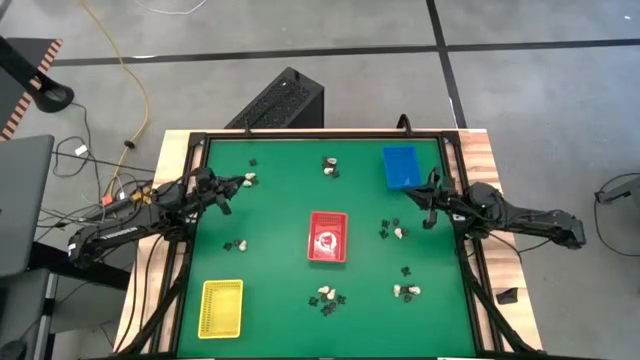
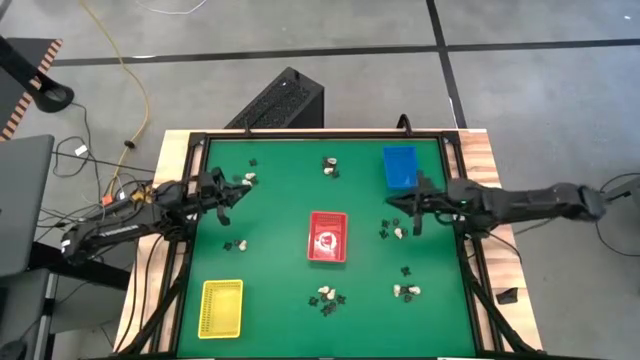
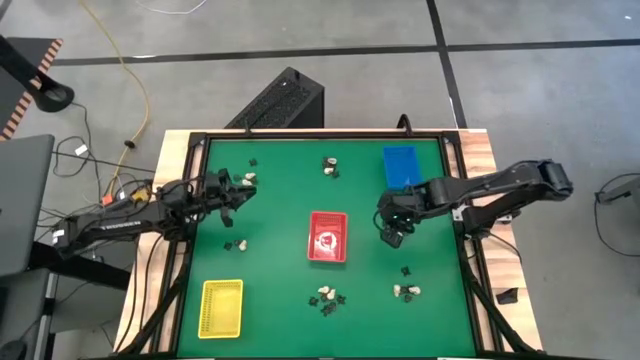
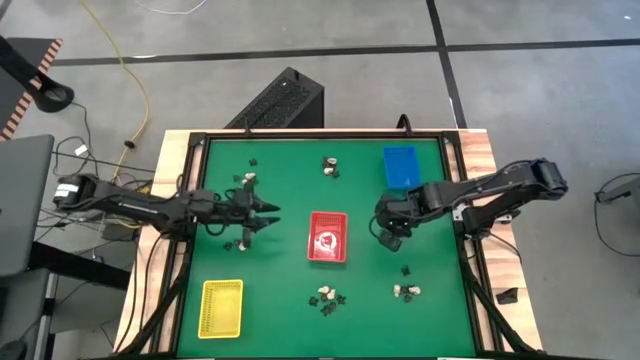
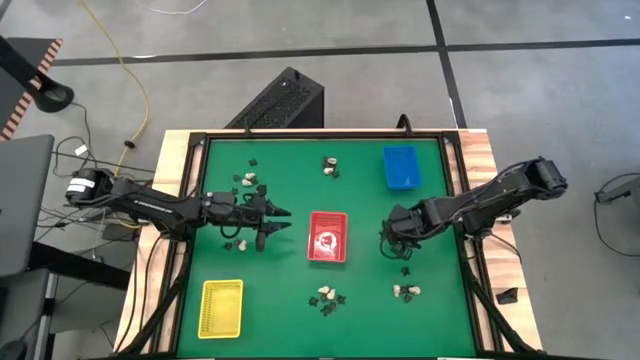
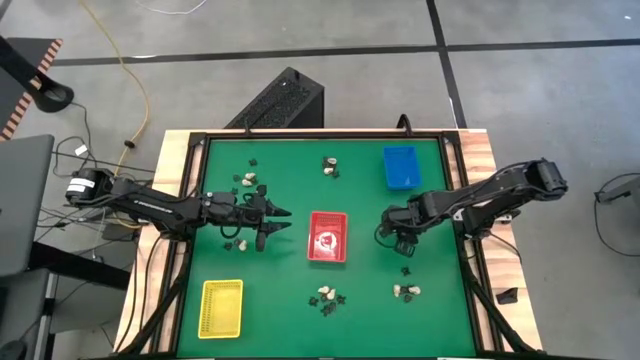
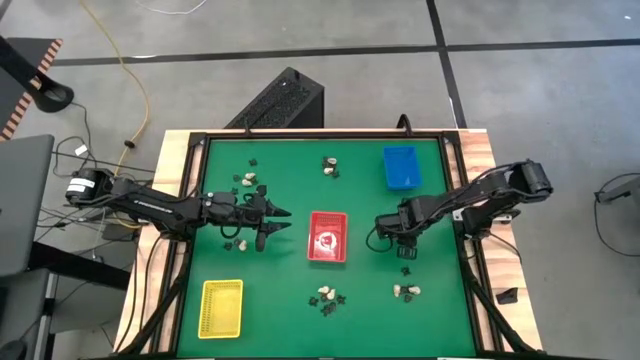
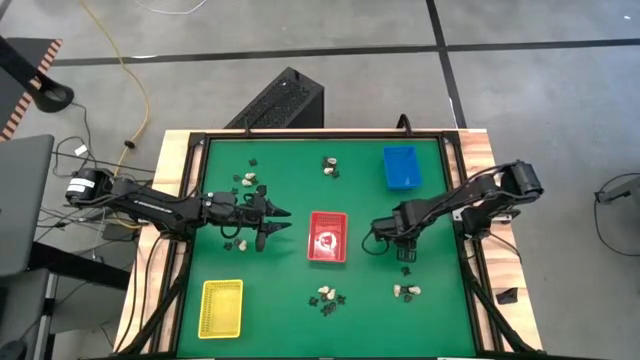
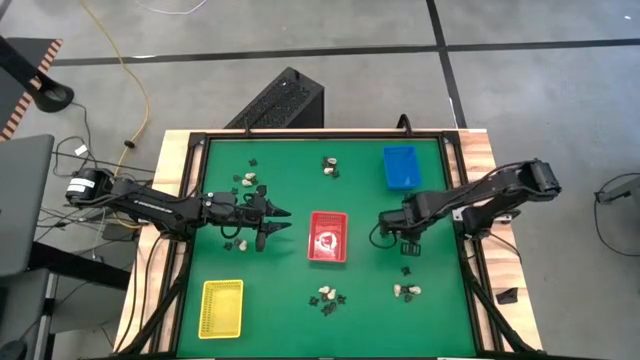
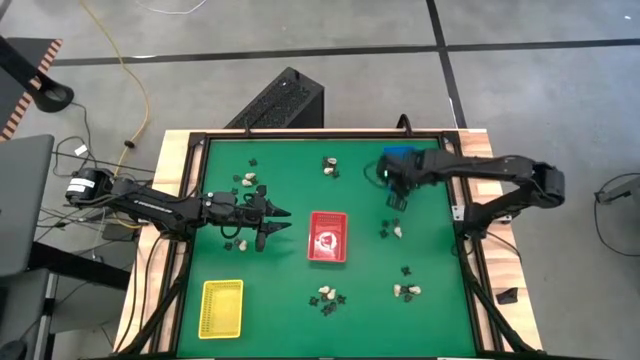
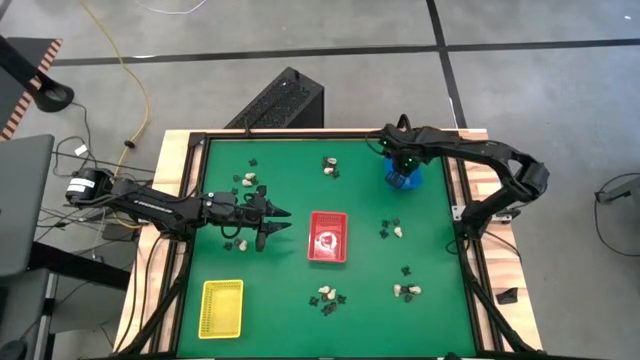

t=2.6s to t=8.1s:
Task: Sort Halloween decoration
Put the black skull toy into the blue bin

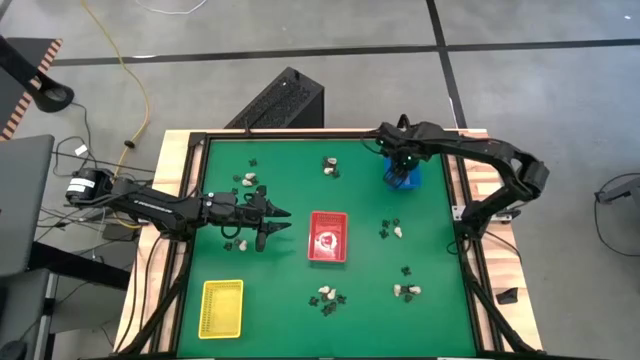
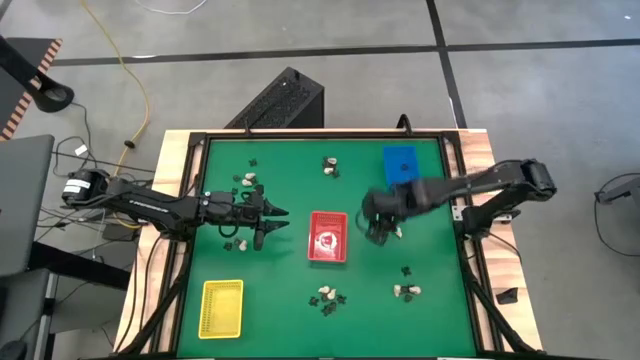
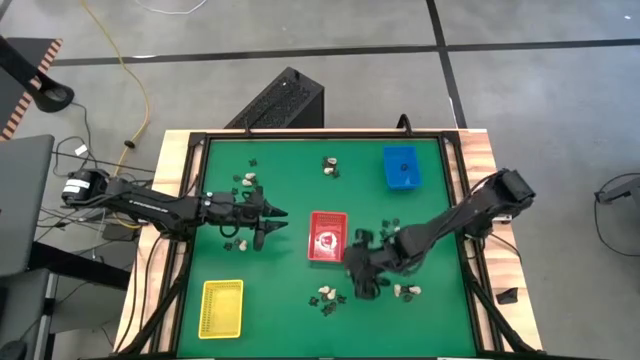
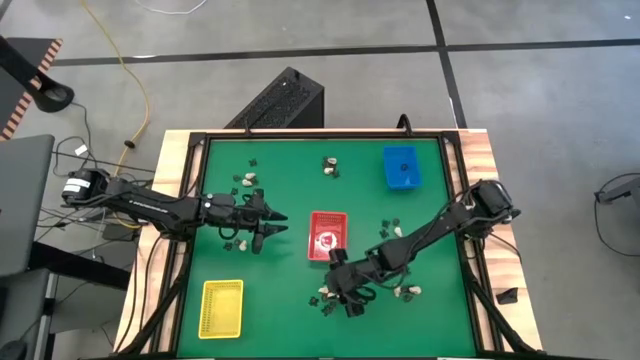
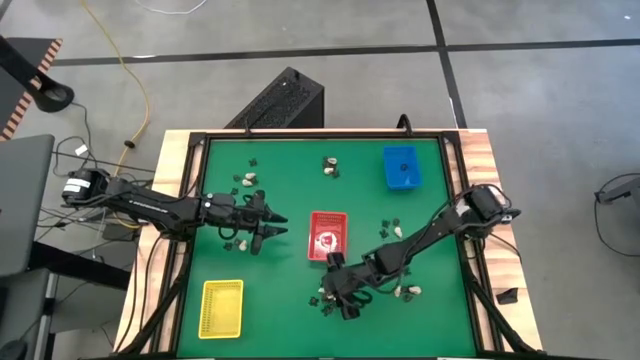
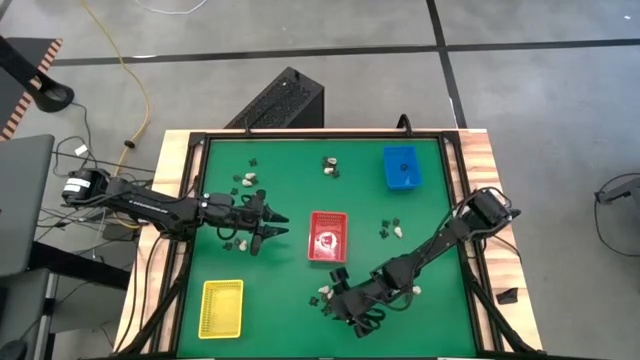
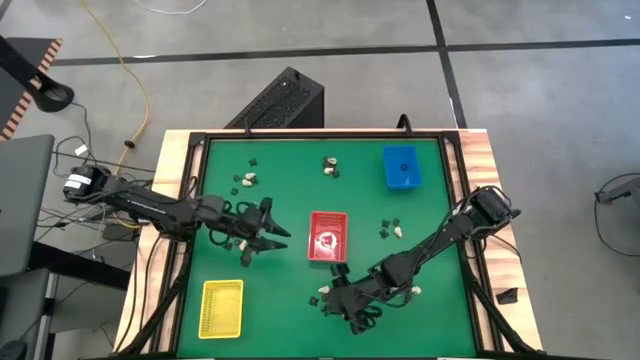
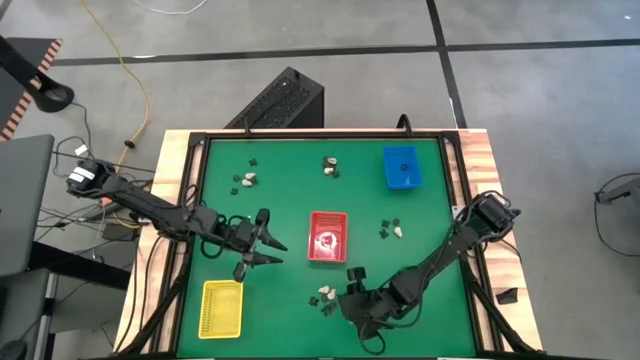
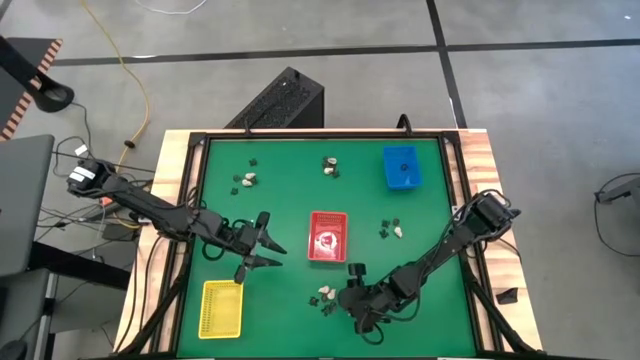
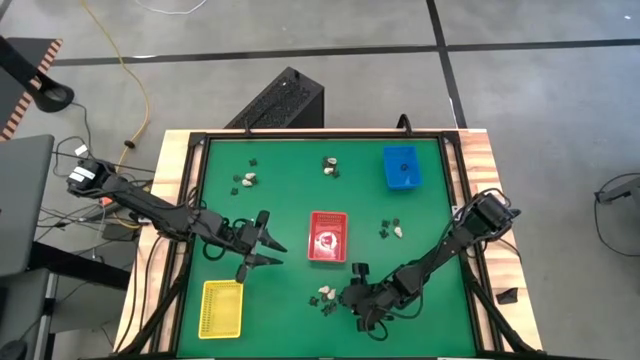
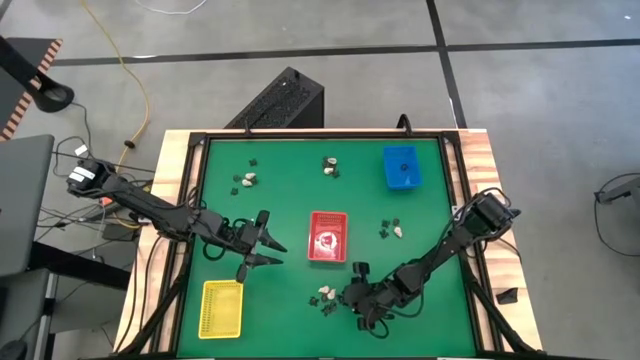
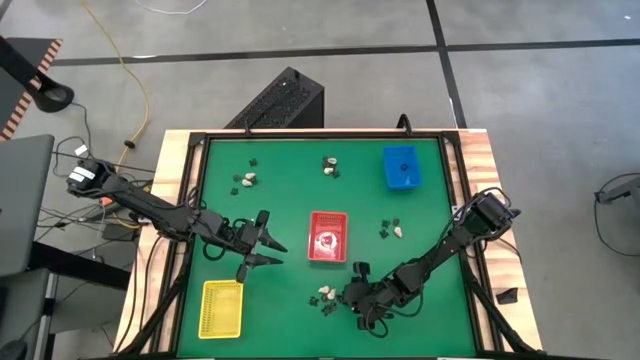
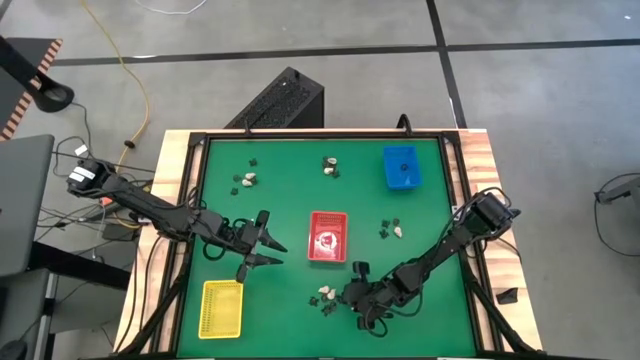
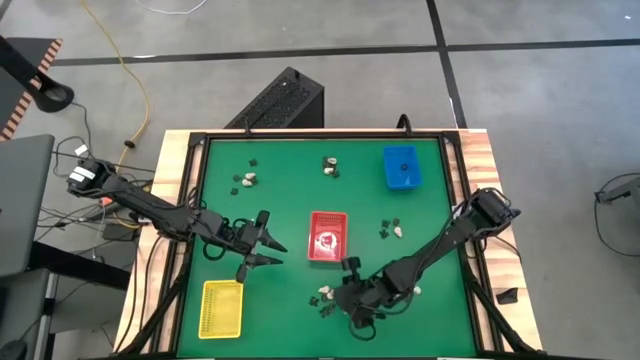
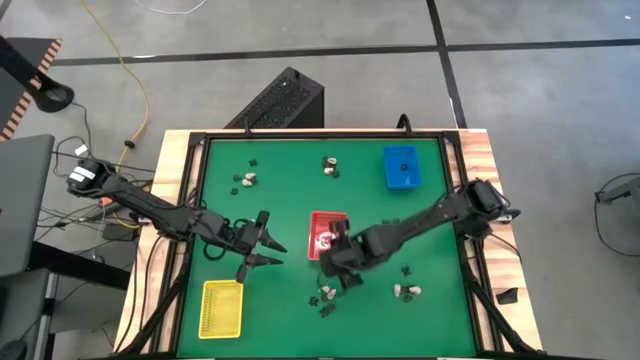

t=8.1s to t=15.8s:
Put the black spider toy into the red bin

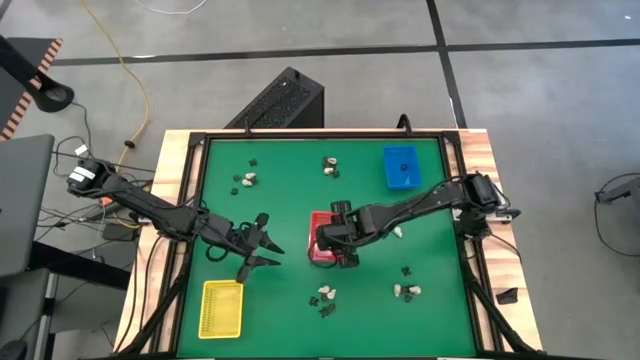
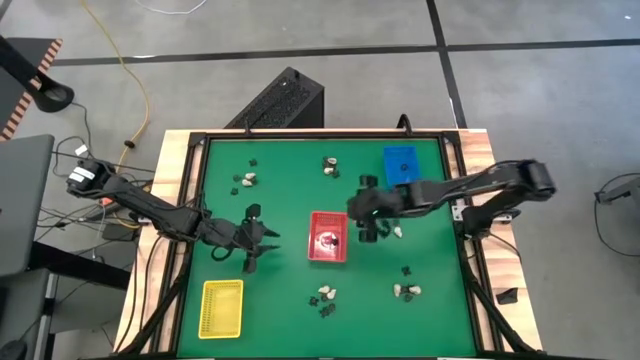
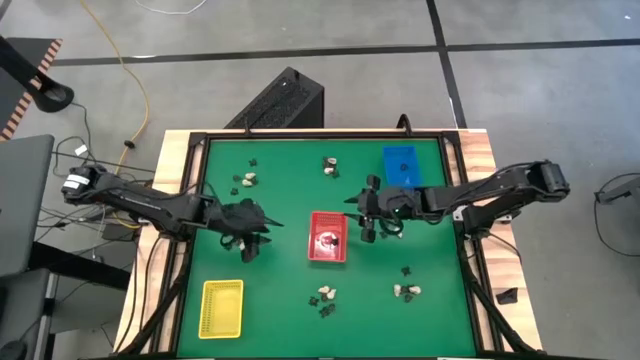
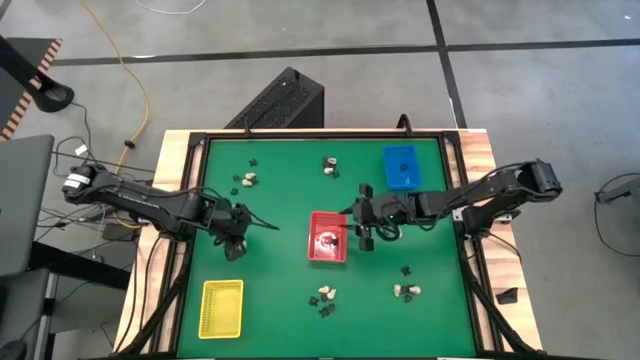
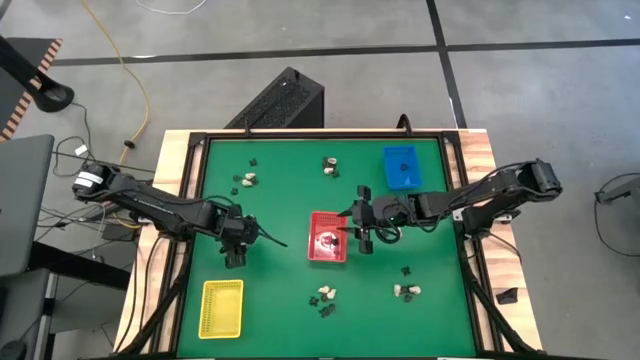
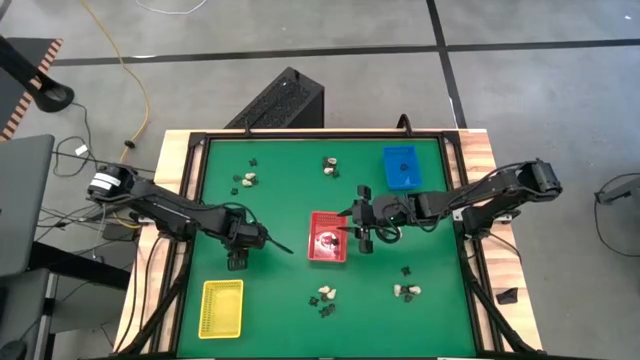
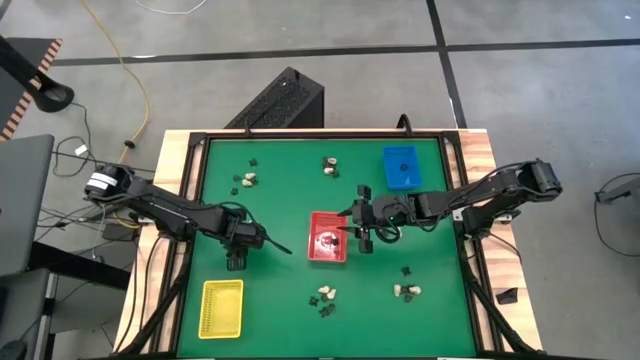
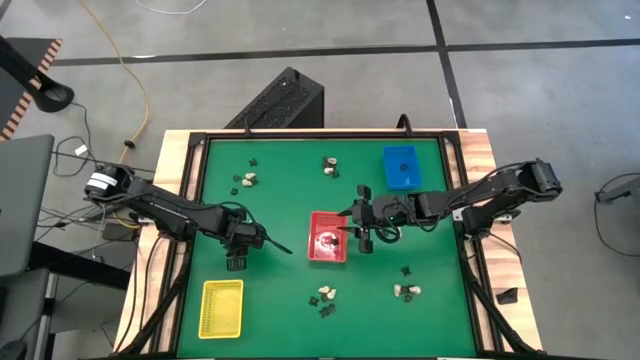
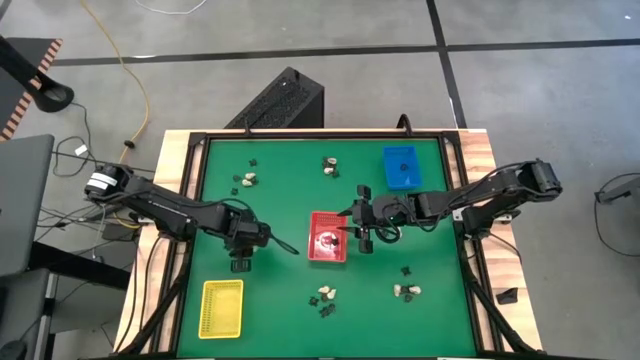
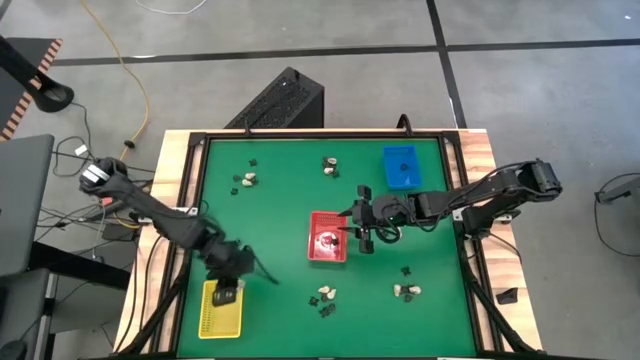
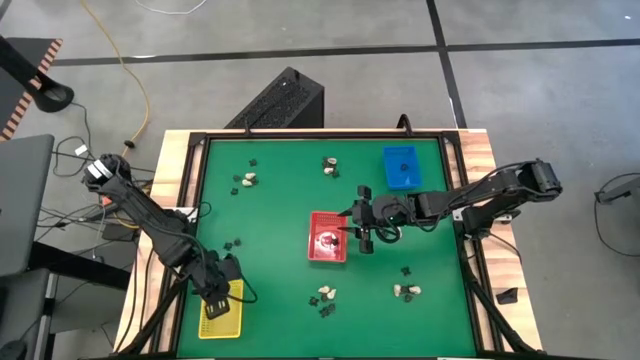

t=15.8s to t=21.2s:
Put the white skull toy into the yellow bin

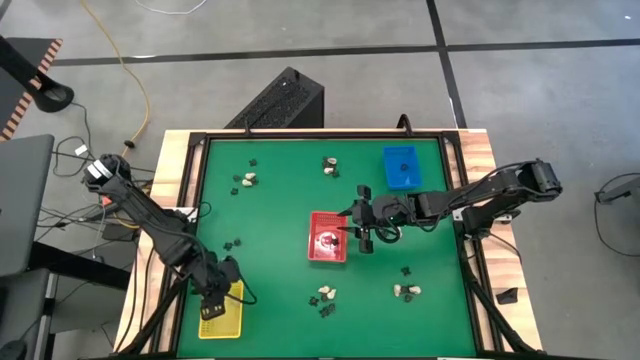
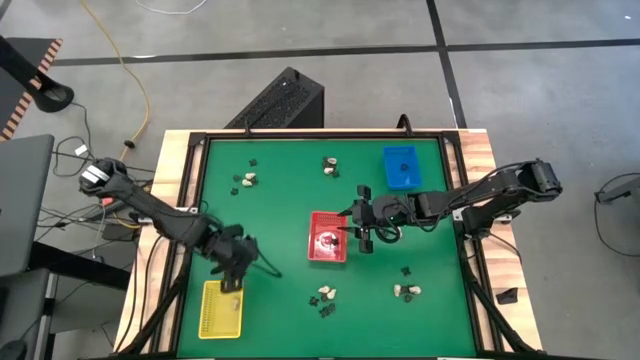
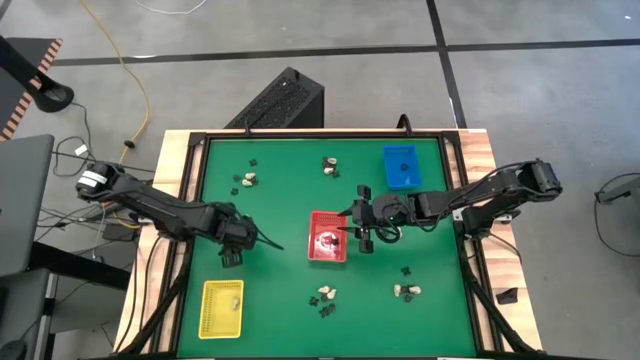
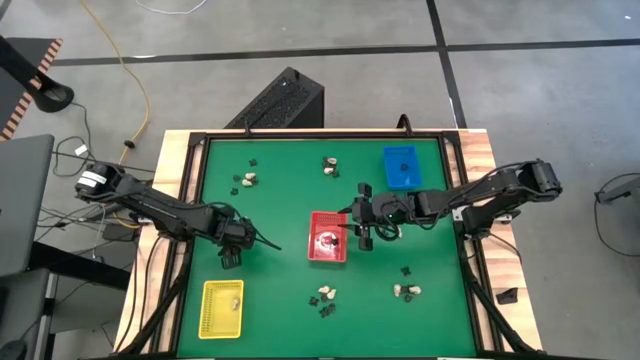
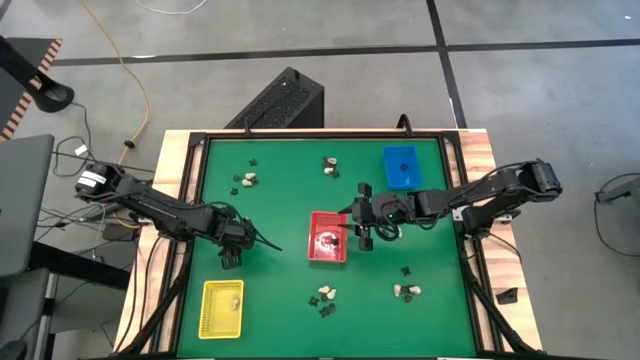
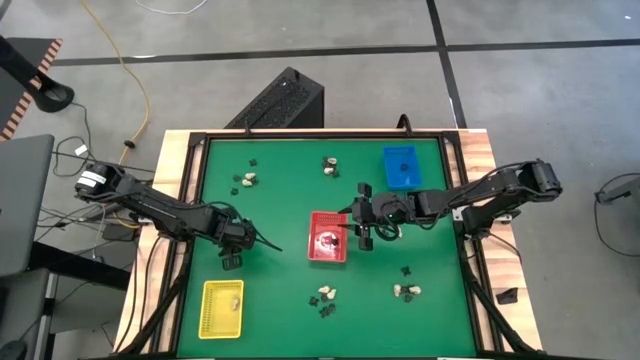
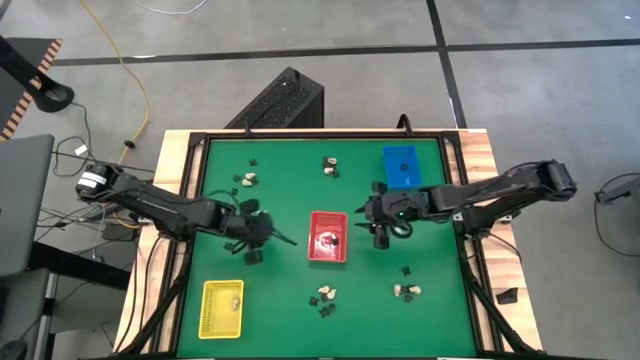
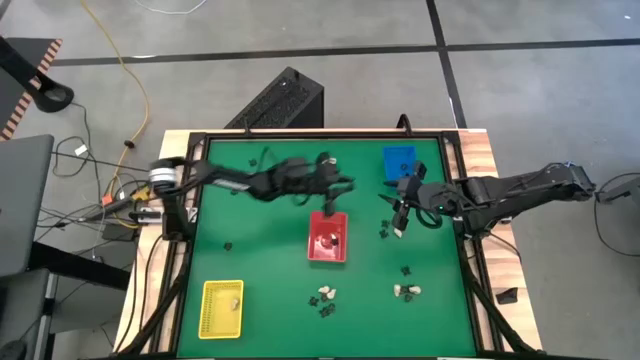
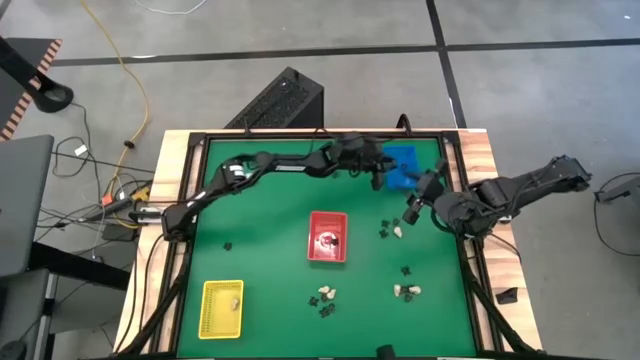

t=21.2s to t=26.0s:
Put the black skull toy into the blue bin
